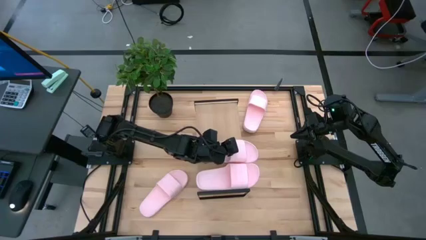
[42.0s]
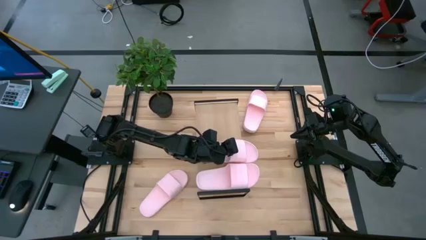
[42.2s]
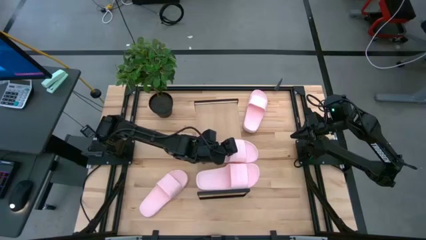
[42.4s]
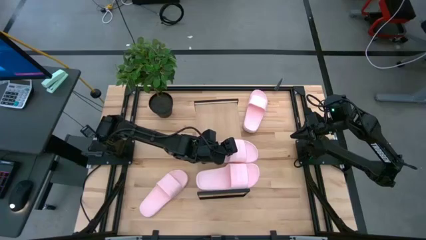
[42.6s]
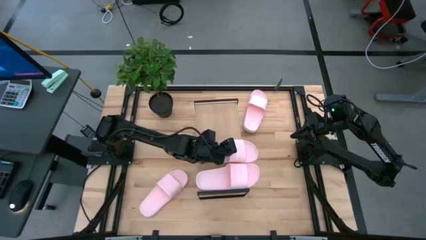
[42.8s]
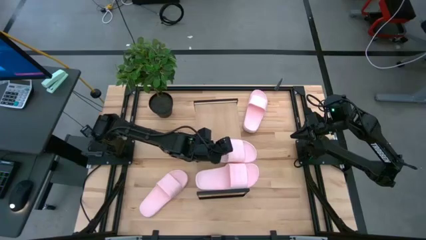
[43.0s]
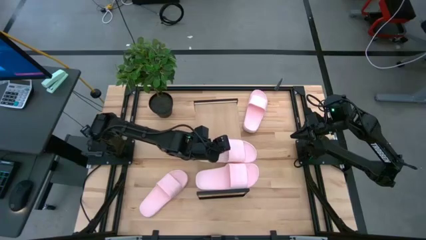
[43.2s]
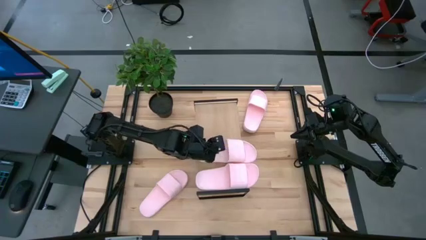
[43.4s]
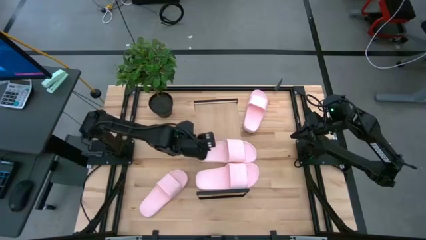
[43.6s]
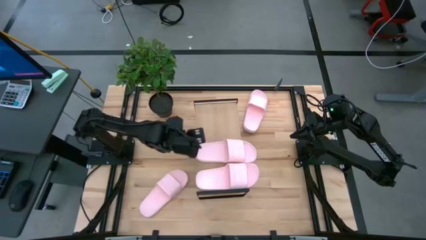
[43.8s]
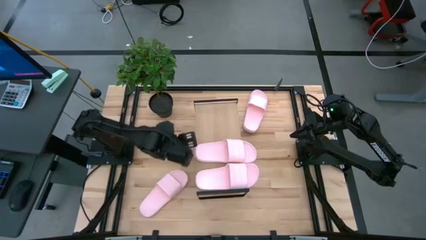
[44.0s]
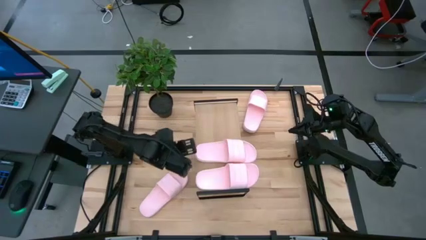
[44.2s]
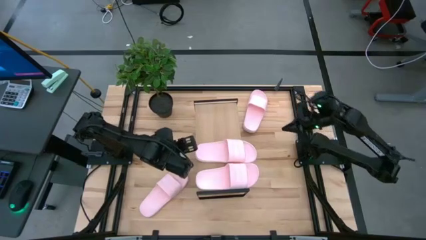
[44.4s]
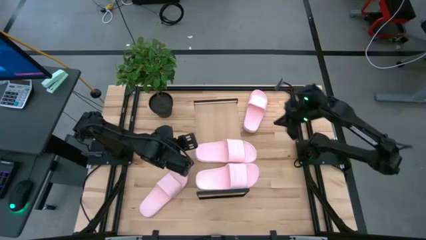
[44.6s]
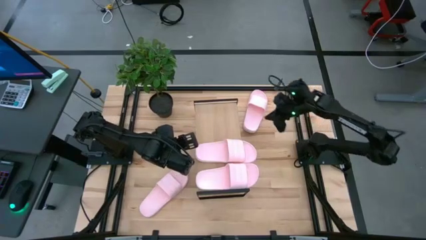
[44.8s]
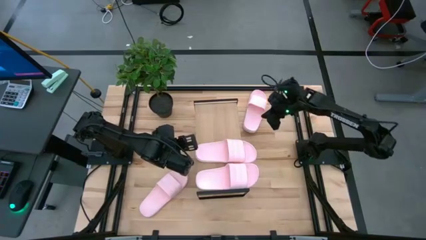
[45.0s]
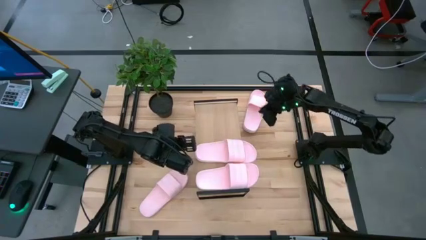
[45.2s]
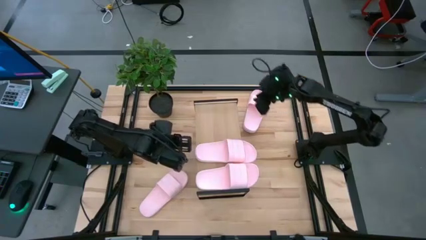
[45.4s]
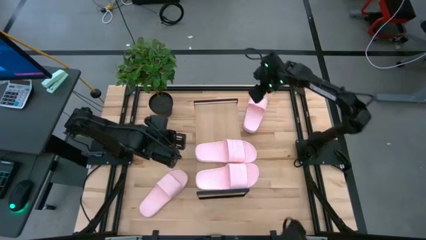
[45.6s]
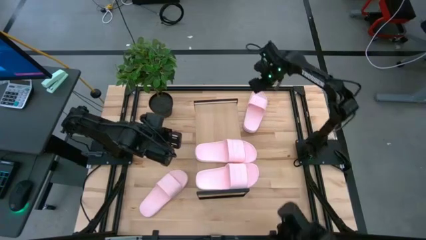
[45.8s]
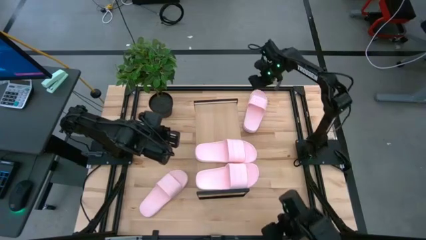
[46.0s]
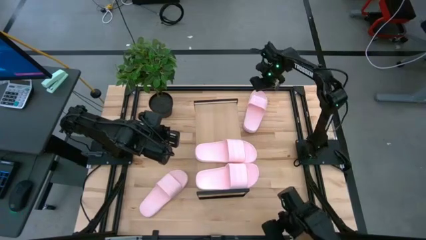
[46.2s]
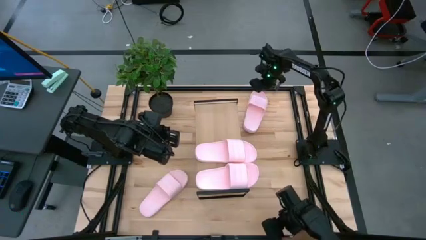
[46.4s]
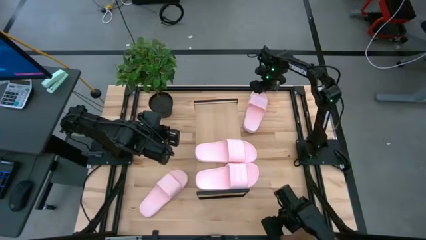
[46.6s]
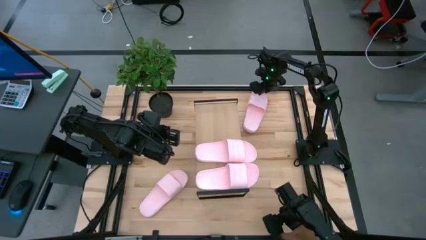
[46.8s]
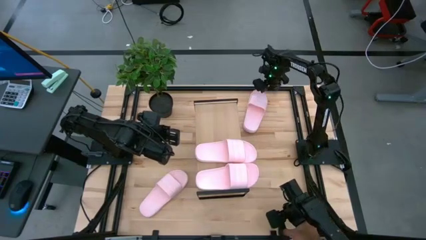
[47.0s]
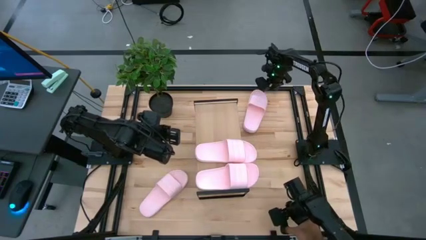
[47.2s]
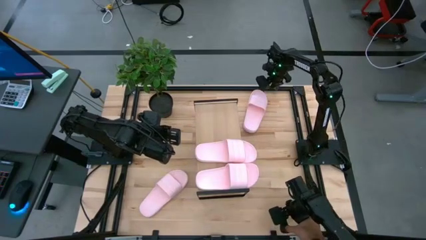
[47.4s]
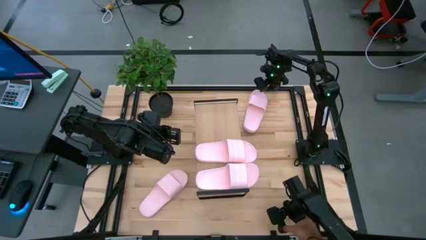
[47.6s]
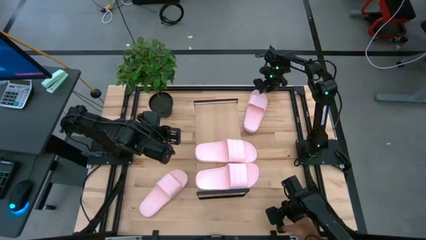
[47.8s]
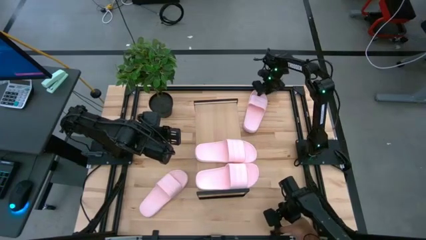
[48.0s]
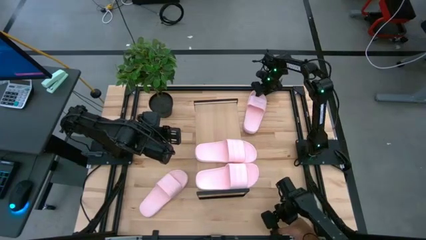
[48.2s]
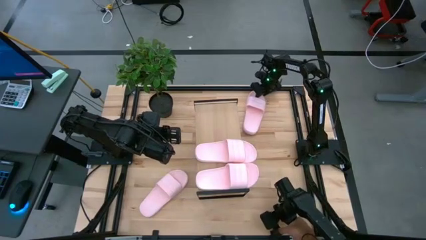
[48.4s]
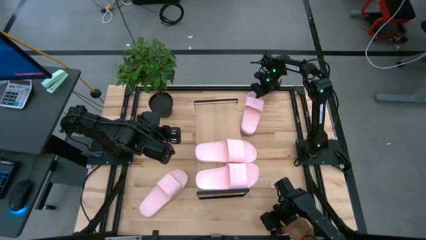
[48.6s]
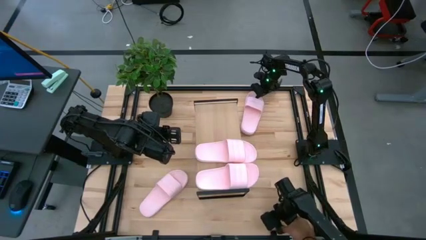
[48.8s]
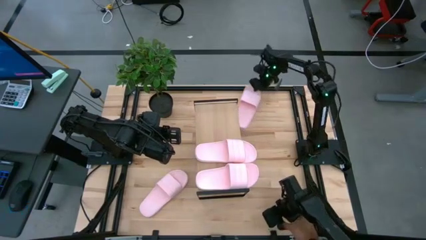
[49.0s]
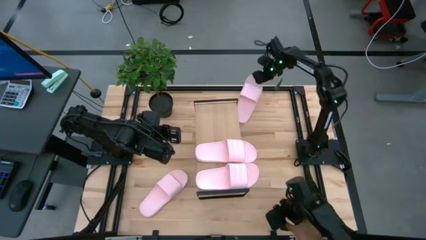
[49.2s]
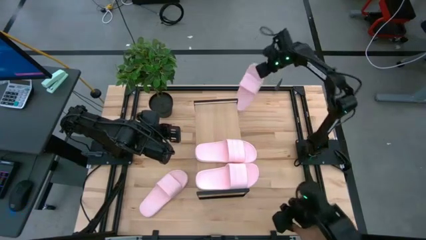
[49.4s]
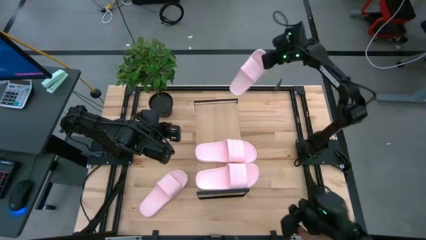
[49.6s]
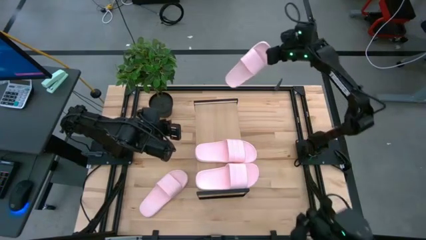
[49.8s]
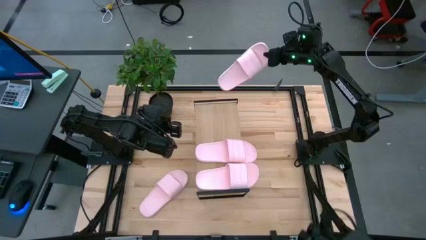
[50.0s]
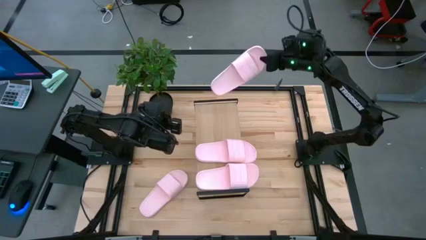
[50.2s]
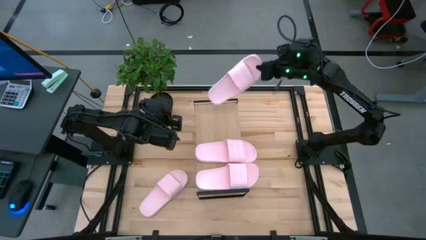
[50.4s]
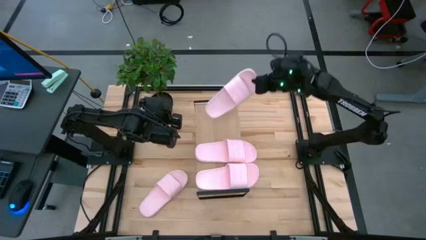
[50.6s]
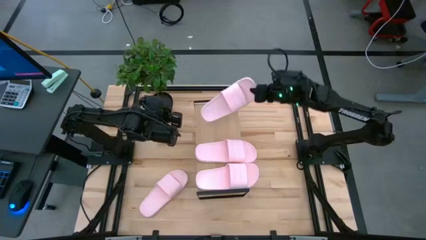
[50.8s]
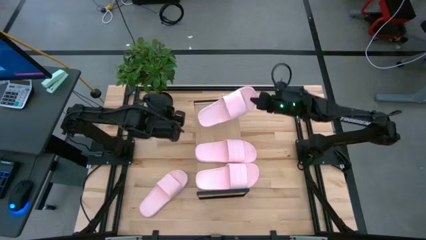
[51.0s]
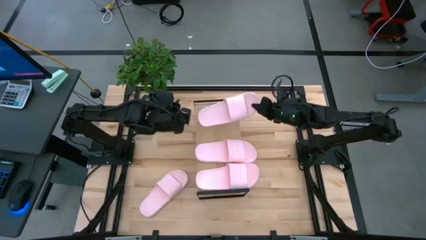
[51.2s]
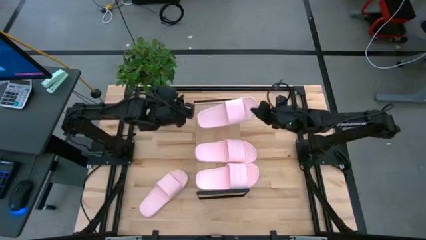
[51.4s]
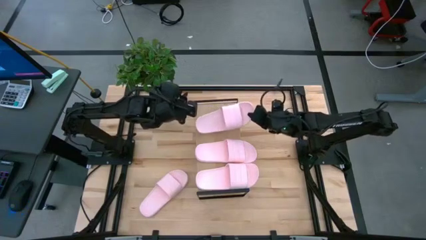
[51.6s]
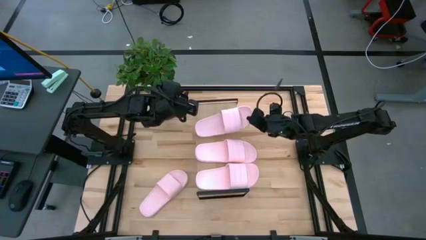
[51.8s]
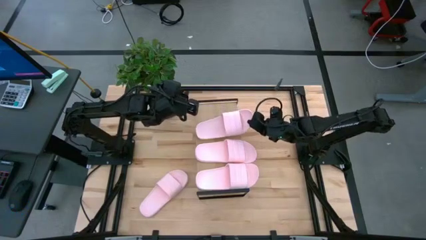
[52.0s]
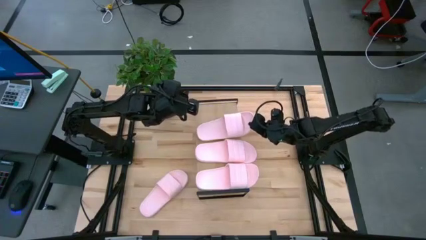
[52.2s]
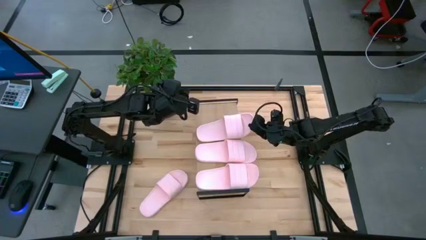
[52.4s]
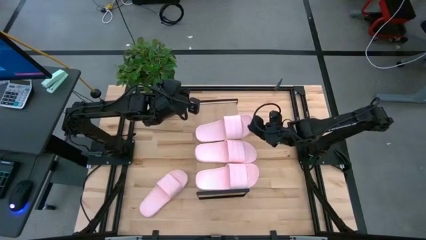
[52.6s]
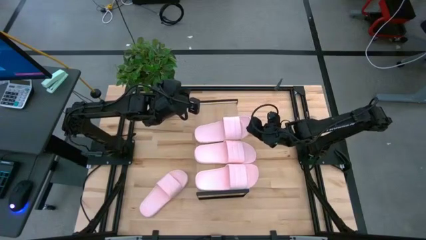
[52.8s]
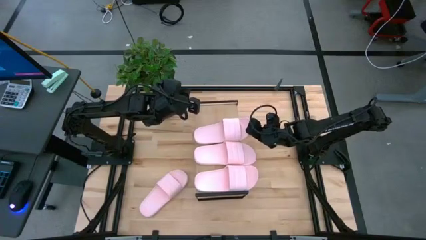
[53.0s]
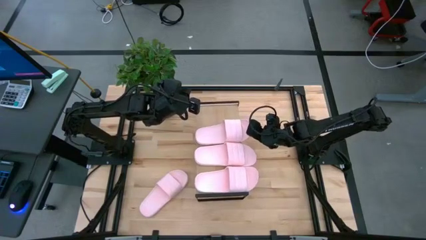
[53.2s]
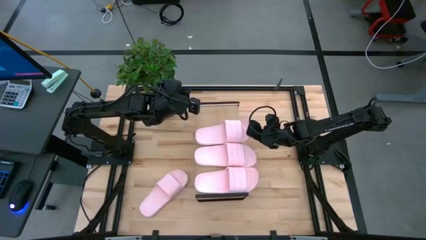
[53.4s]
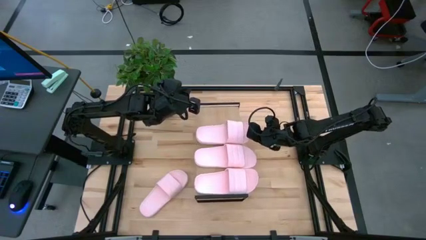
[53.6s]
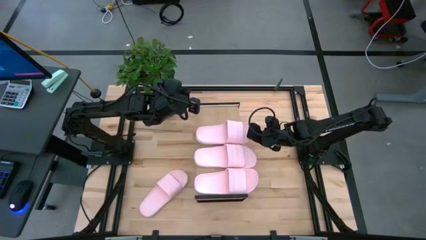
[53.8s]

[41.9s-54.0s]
Task: Pick and place slides into the shelf
Put the top pink slipper on the shelf

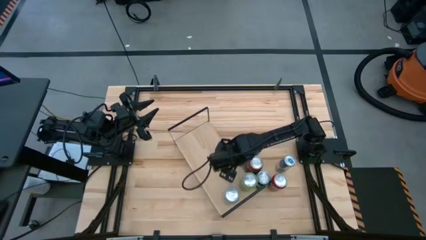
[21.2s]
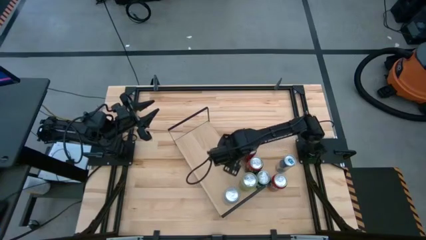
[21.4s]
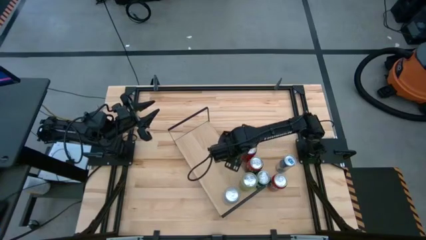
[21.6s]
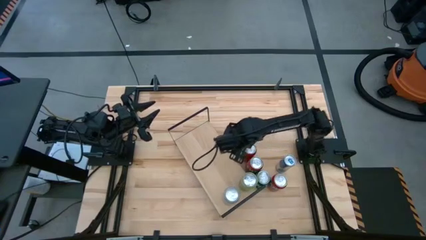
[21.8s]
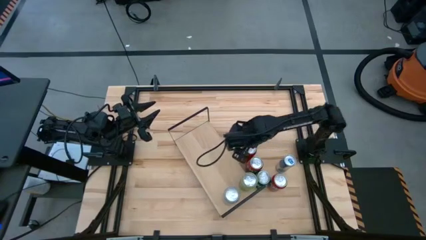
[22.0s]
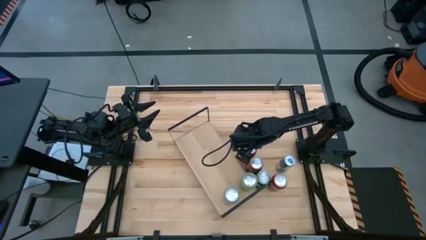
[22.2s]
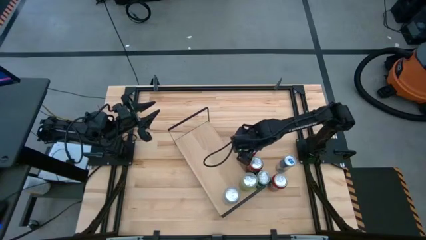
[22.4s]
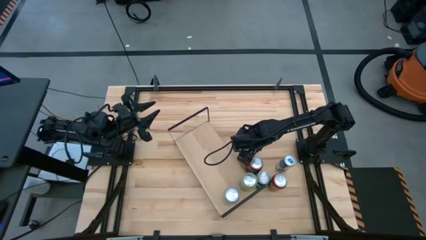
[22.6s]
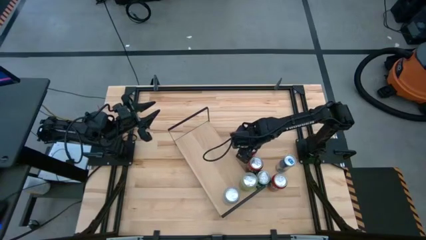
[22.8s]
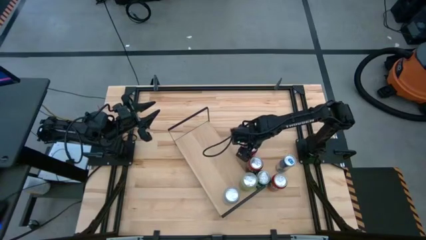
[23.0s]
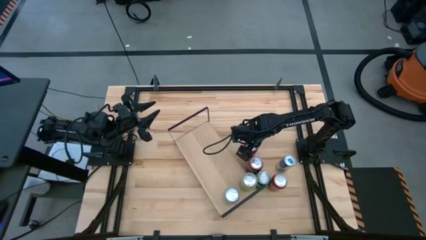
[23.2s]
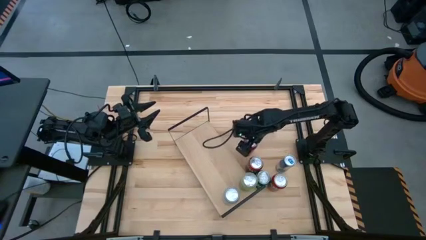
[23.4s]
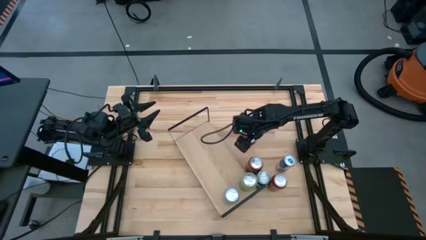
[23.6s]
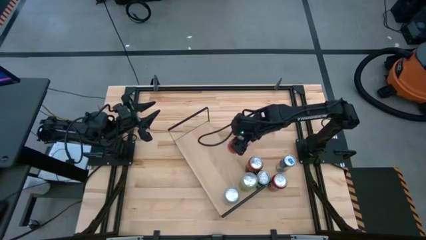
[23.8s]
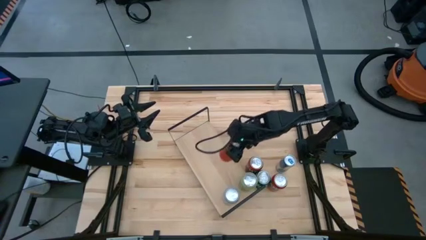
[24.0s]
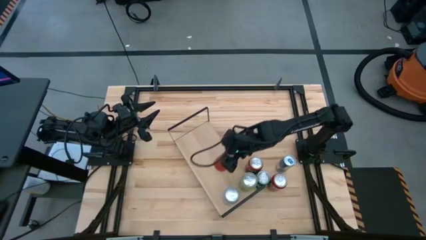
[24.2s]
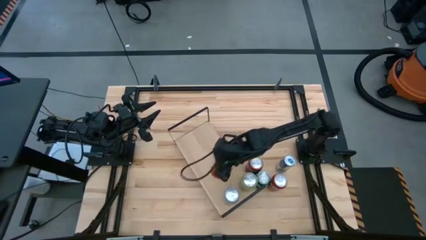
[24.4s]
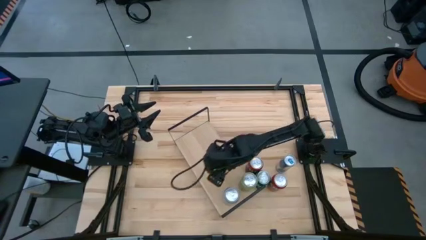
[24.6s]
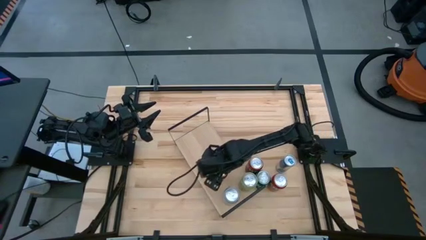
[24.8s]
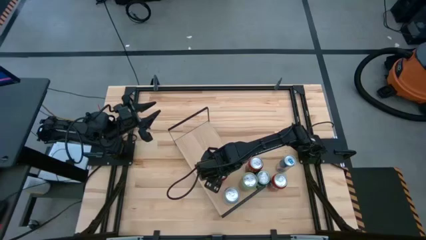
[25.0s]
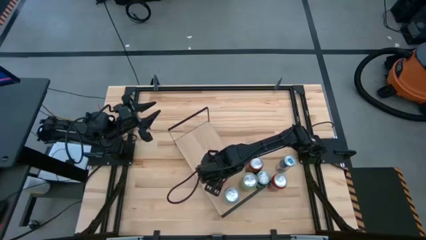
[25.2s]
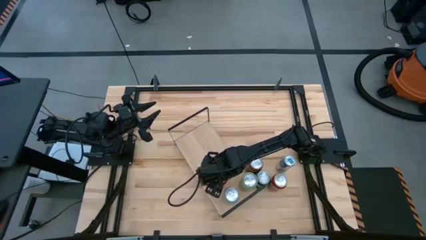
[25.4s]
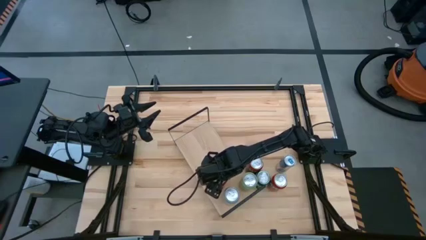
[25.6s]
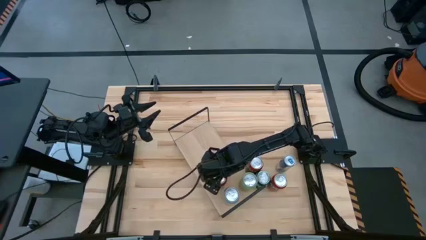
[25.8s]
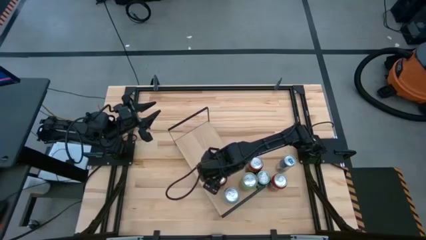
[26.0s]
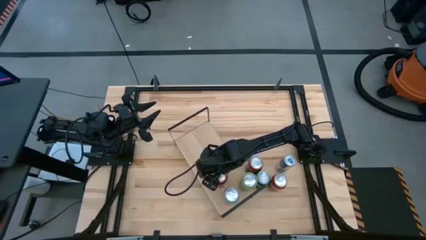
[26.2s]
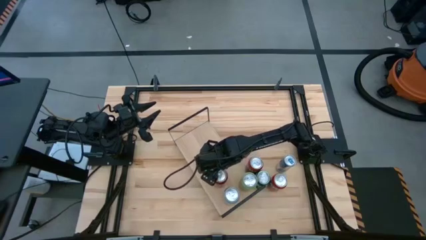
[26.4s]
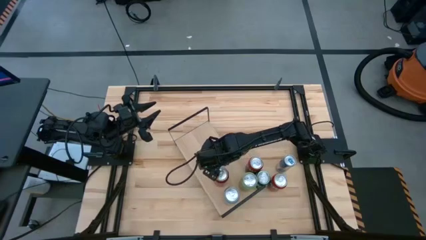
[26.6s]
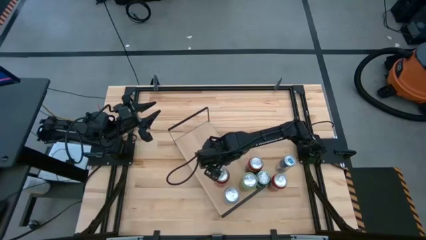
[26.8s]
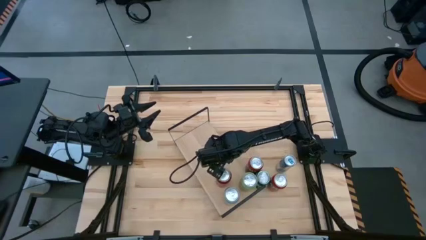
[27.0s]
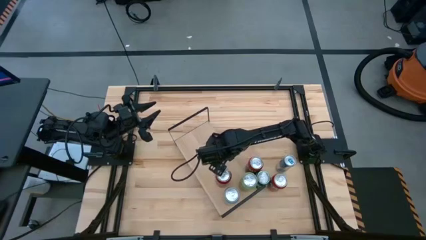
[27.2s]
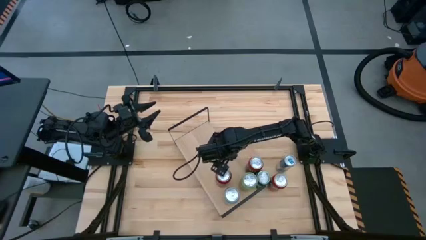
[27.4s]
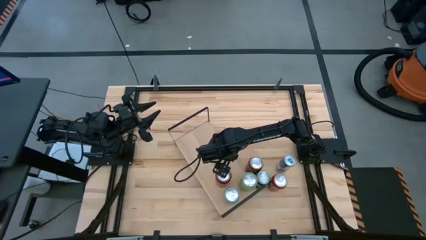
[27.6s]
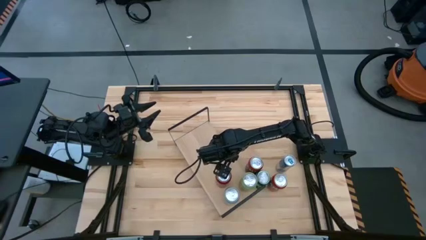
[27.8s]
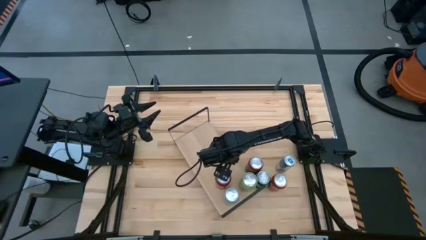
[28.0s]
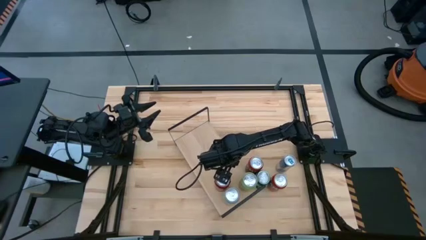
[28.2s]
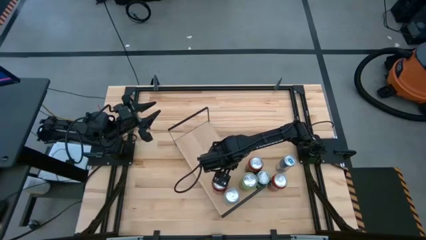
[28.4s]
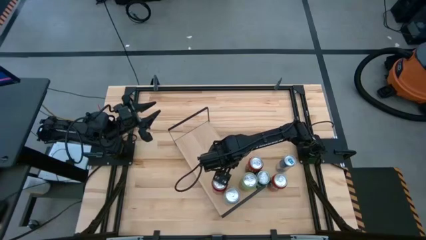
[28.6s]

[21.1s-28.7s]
Task: Place canned beverage on shelf
Put the red-black soda can on the shelf
